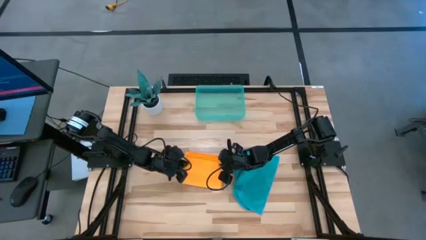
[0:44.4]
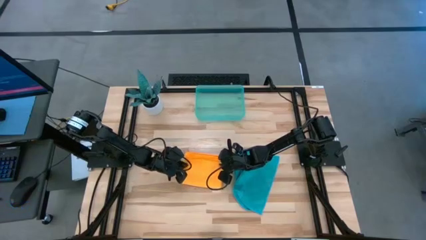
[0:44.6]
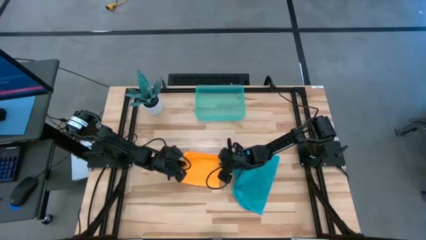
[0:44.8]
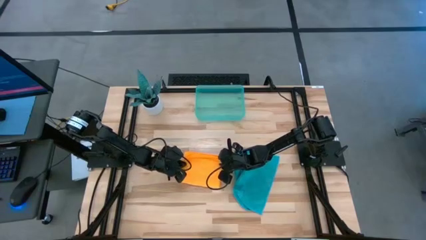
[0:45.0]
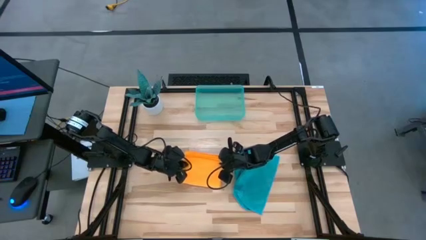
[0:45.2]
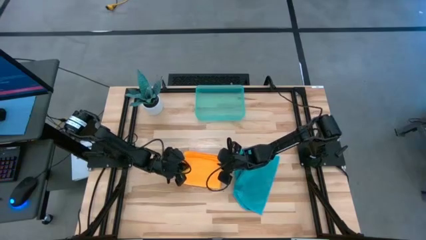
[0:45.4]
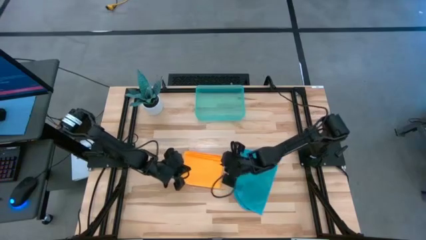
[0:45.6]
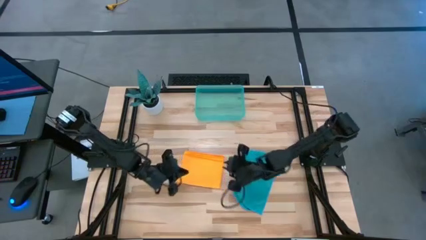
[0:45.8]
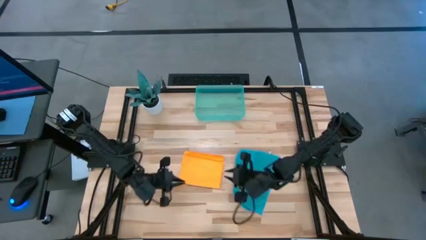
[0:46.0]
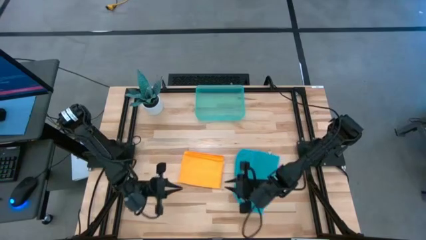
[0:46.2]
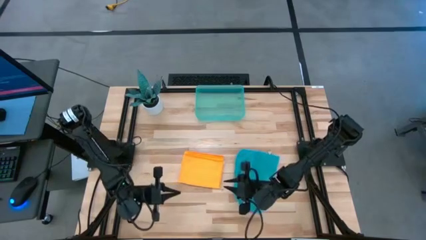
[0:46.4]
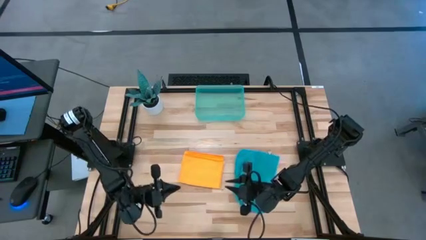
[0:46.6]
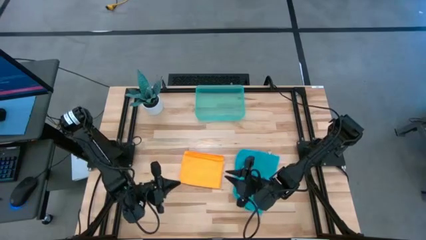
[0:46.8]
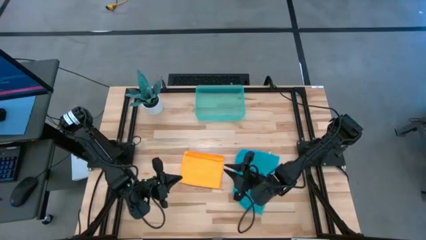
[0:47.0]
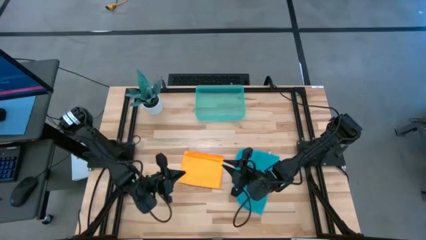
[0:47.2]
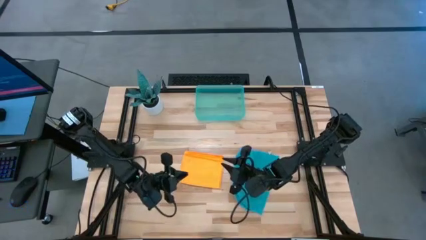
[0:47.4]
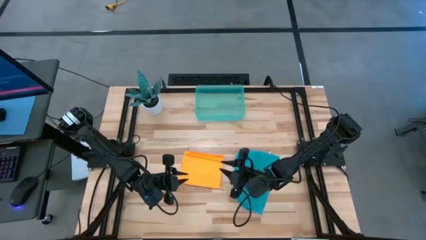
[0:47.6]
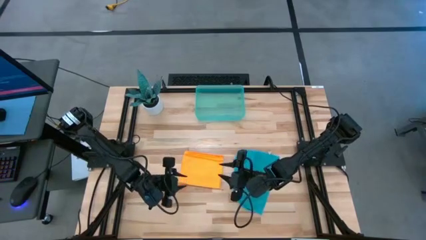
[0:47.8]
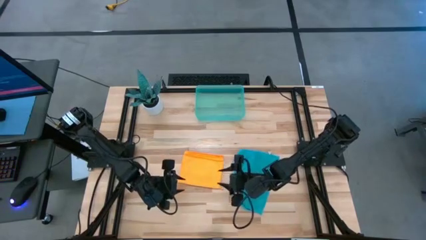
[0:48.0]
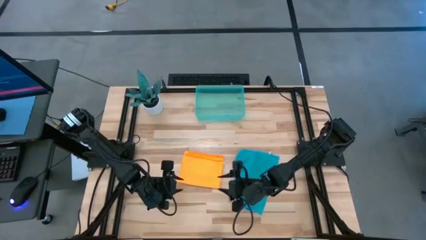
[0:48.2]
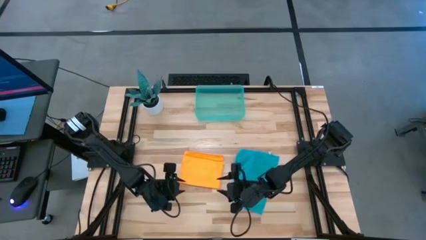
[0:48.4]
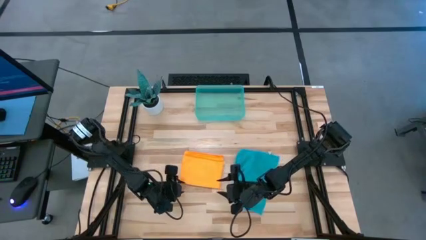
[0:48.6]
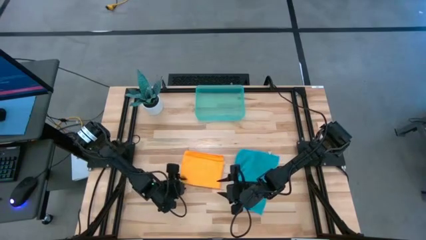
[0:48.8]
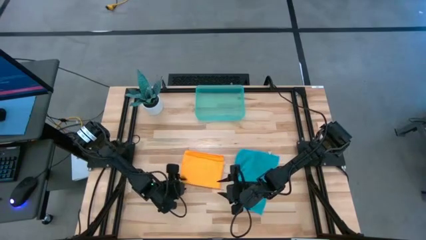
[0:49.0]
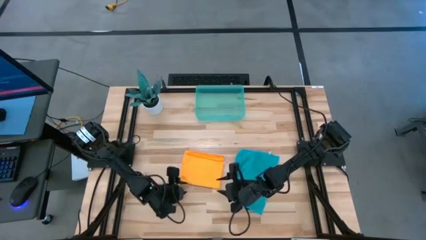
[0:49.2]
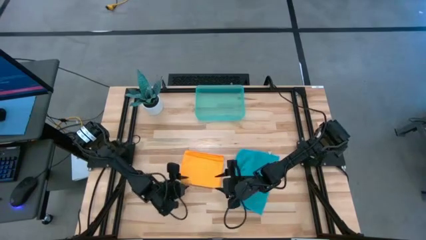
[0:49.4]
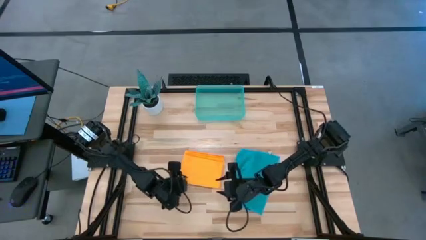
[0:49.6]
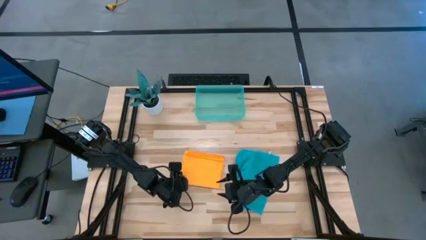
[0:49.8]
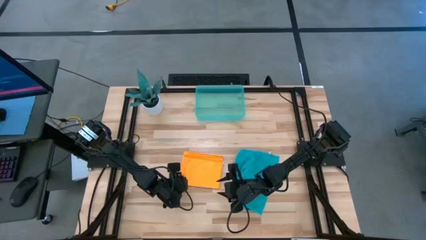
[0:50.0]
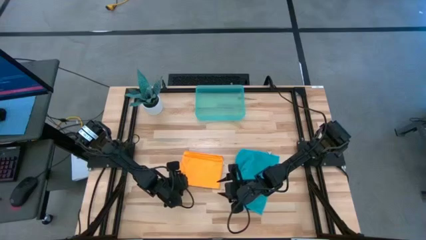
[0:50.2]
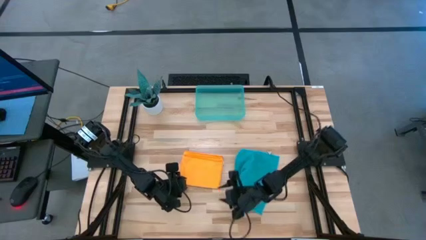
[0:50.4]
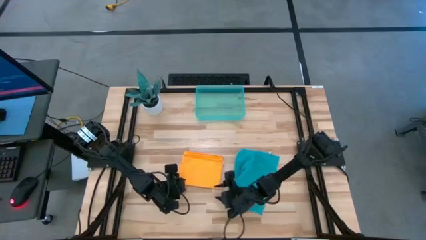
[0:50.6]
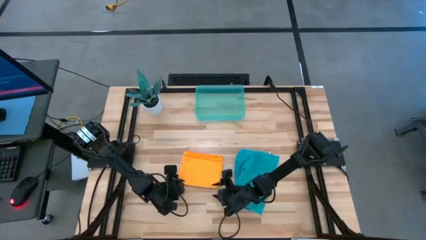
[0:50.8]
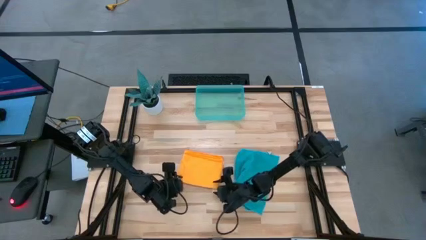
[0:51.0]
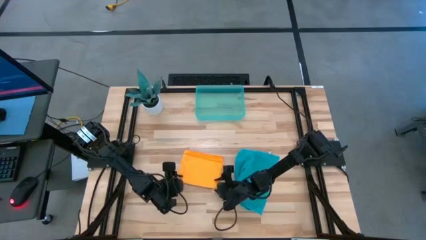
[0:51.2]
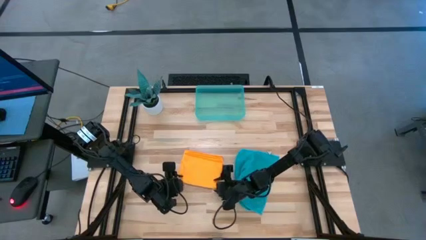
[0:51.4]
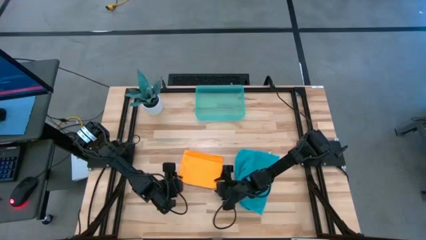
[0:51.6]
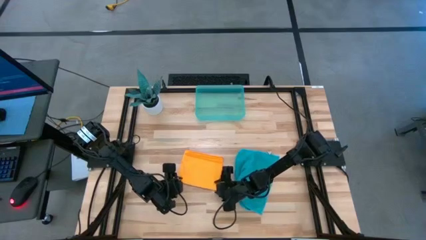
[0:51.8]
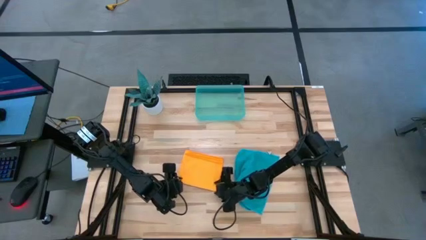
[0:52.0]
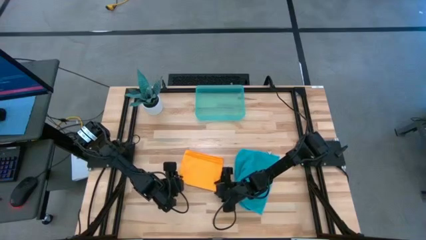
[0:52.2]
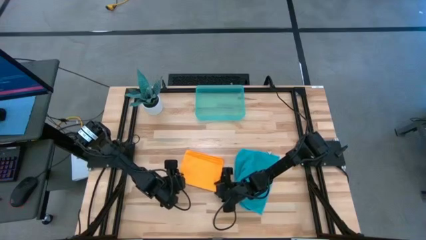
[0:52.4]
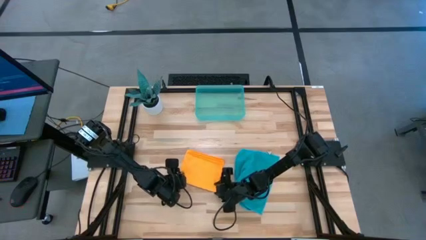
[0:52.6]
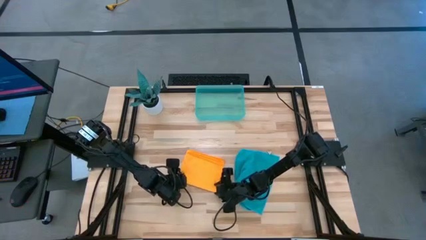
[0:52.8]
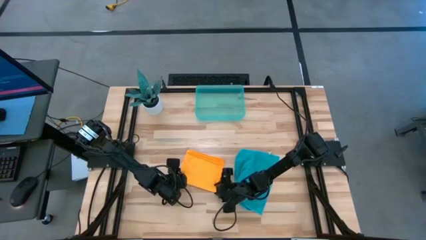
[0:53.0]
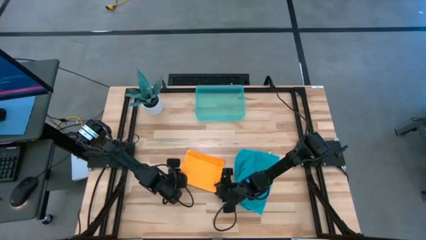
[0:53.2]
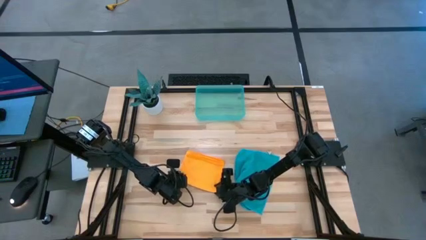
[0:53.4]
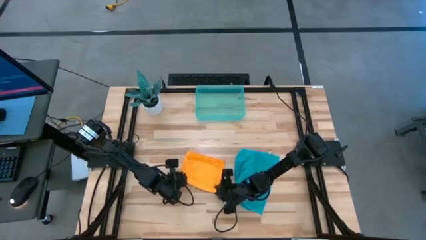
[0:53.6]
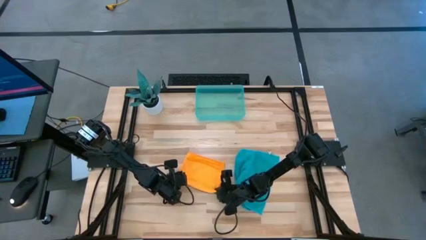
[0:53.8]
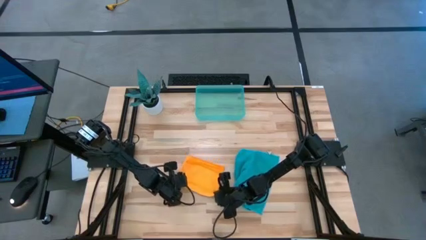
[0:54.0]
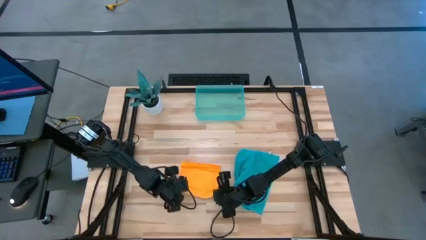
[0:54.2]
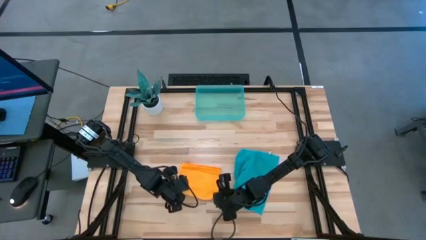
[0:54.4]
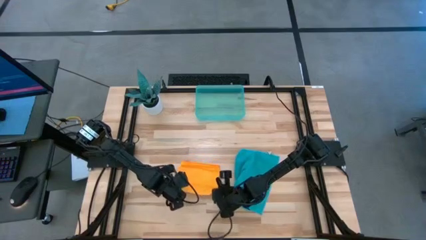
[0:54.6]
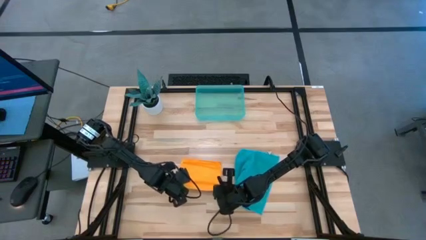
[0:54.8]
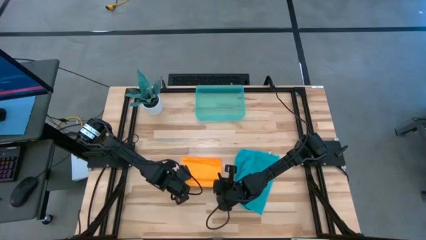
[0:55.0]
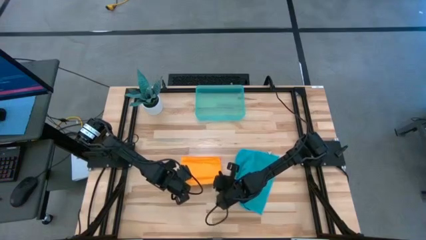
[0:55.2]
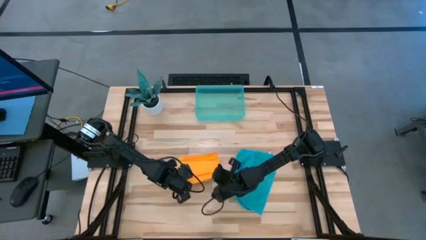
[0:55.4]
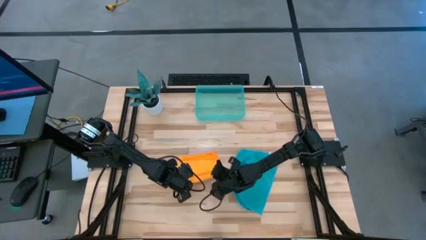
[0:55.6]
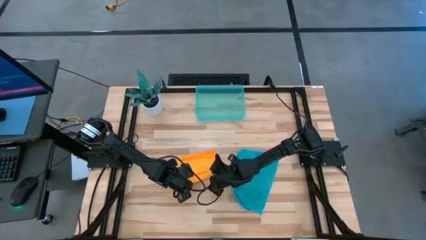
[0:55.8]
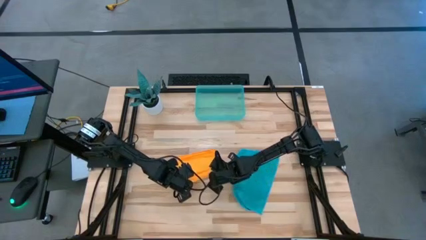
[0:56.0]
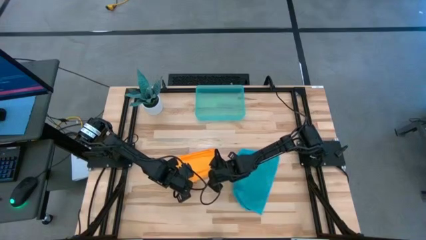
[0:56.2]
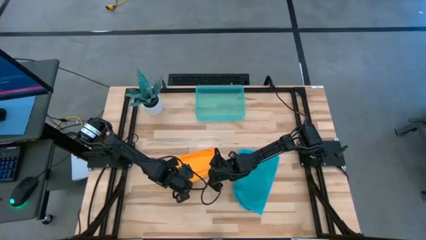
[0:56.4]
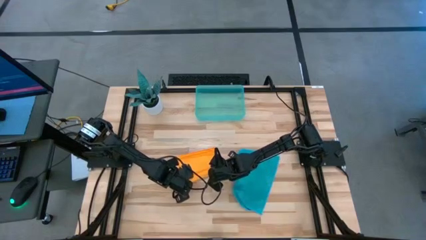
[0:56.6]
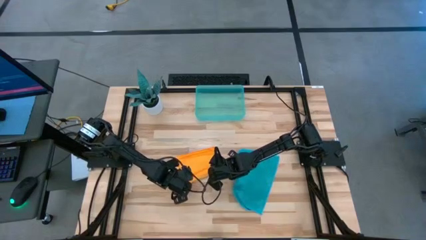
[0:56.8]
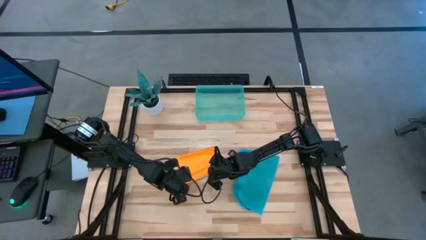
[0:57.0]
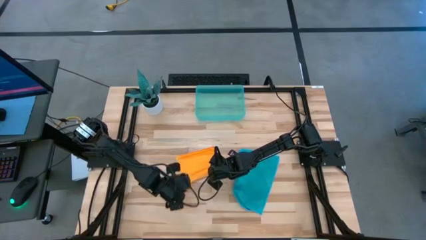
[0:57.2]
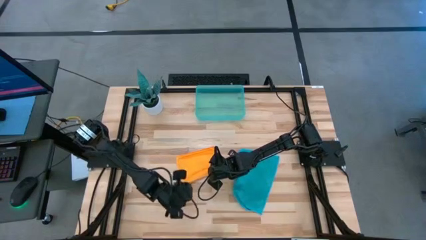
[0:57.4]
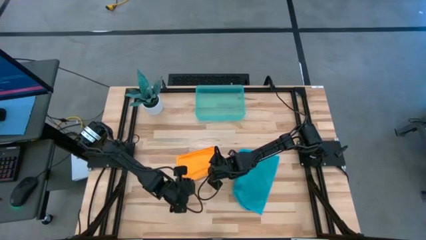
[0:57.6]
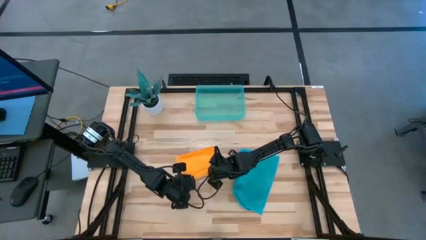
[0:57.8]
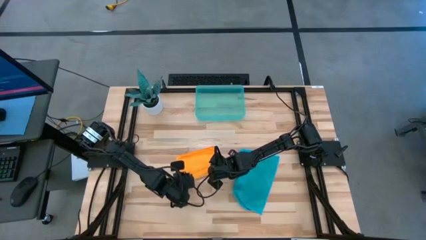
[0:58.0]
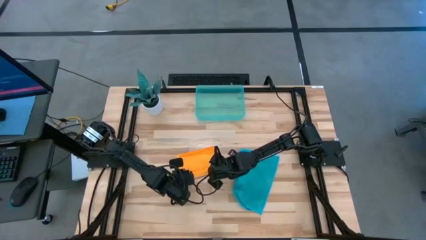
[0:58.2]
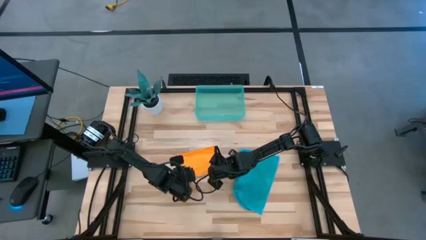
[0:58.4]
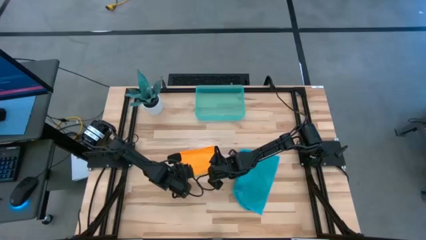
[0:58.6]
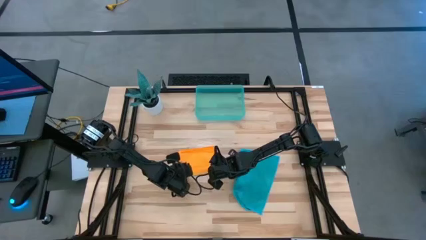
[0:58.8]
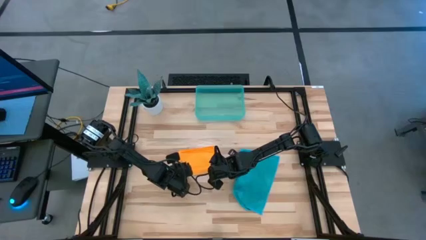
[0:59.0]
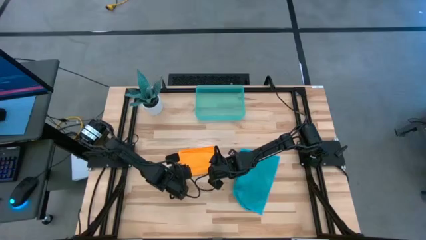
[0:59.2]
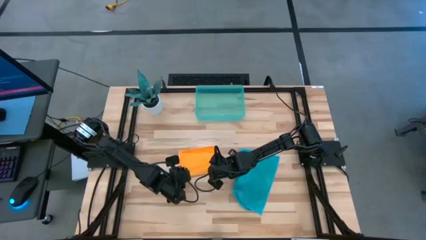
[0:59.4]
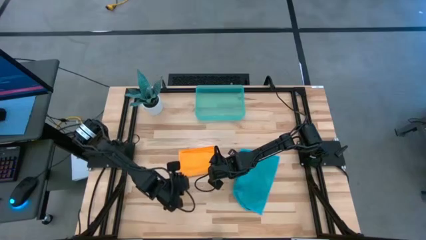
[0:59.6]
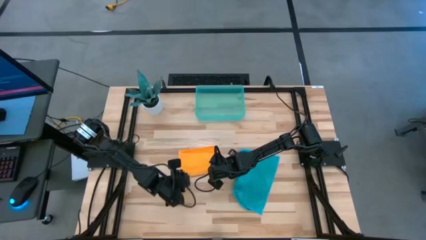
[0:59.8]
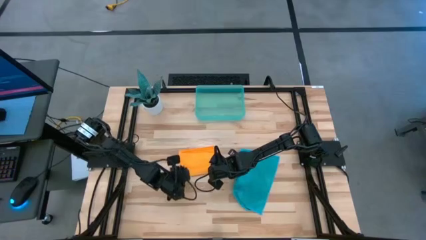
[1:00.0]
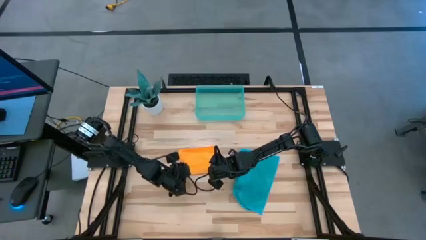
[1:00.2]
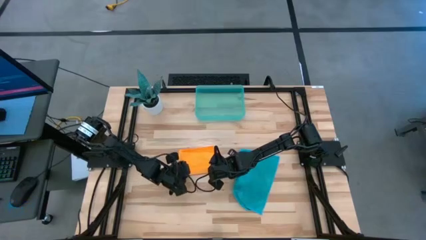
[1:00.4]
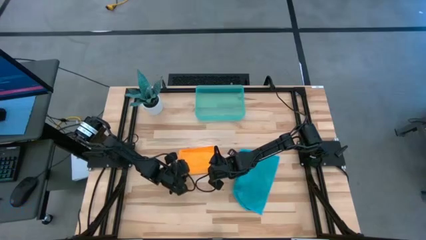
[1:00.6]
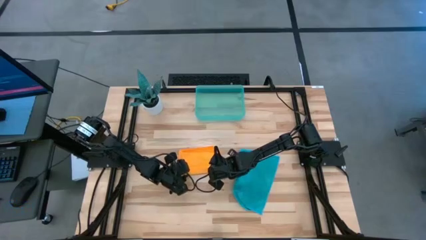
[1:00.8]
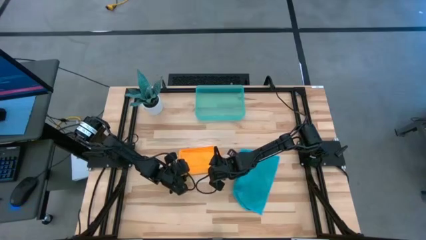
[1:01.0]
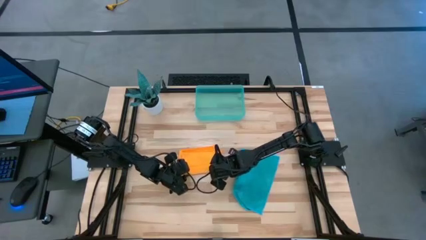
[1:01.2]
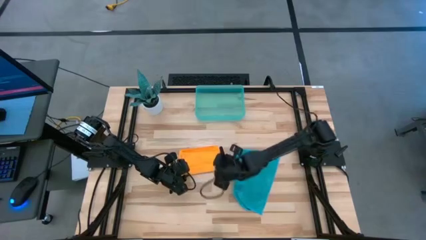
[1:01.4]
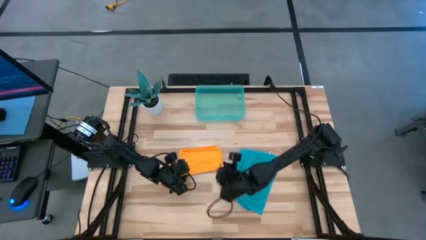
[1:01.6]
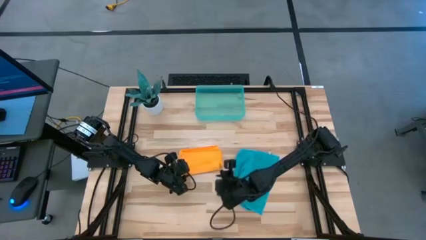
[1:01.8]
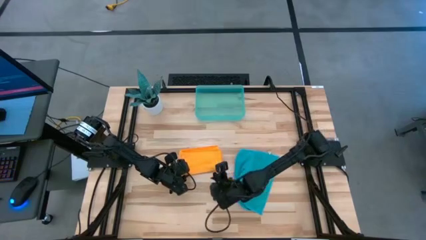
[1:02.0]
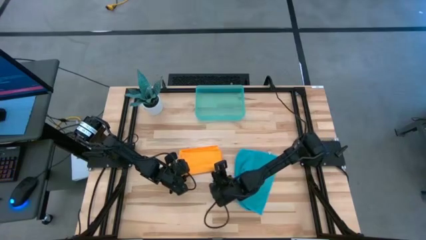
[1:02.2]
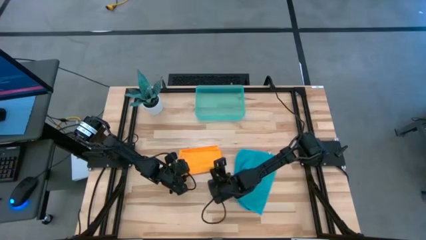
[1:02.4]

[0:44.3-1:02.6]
Task: Roll microfiber towels into tight, uniform cylinder then place into a basket
Roll the yellow microfiber cloth
